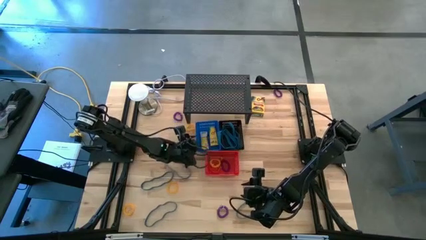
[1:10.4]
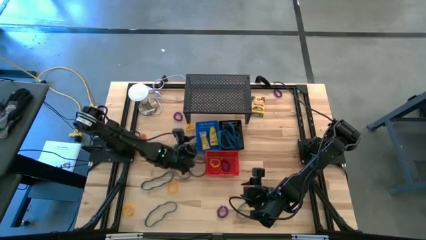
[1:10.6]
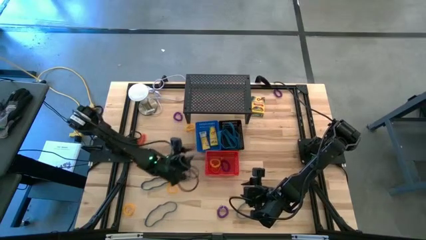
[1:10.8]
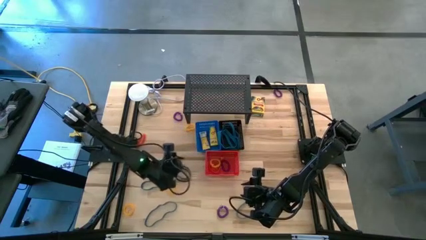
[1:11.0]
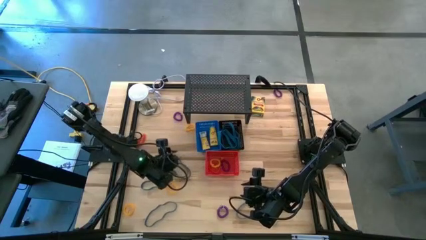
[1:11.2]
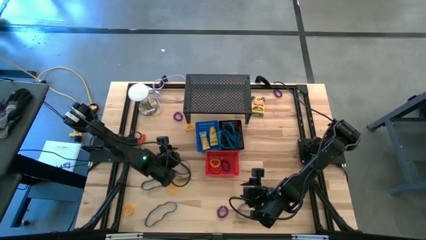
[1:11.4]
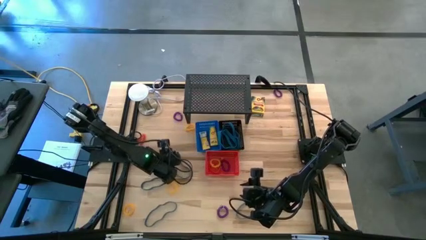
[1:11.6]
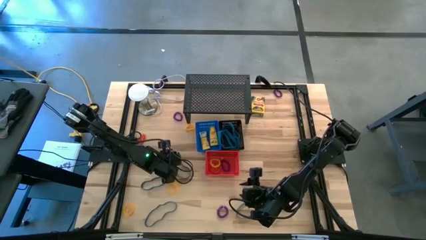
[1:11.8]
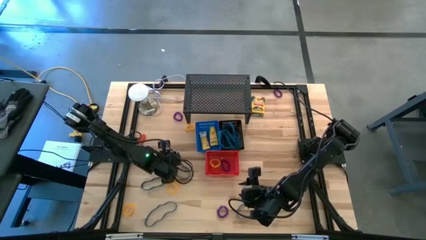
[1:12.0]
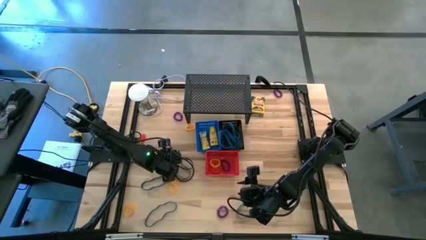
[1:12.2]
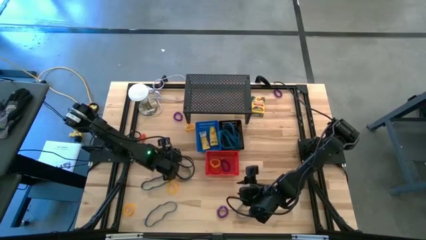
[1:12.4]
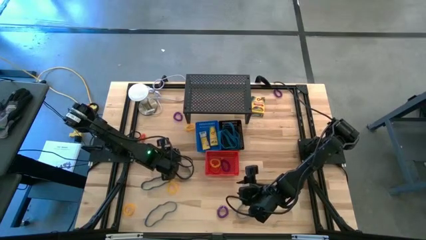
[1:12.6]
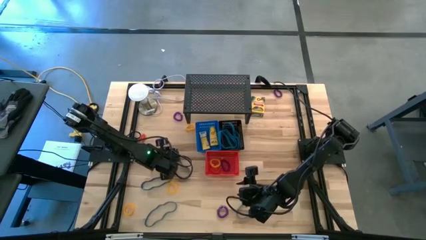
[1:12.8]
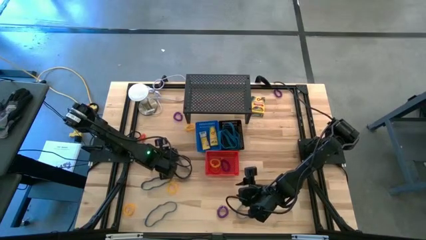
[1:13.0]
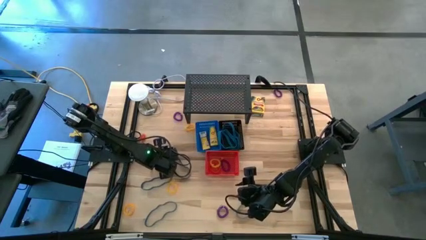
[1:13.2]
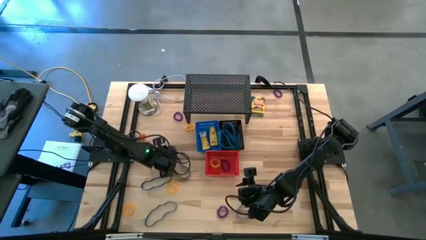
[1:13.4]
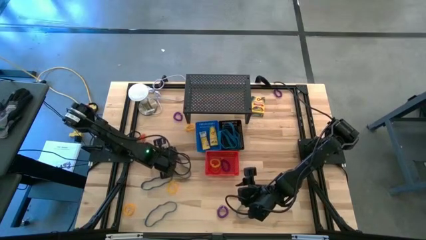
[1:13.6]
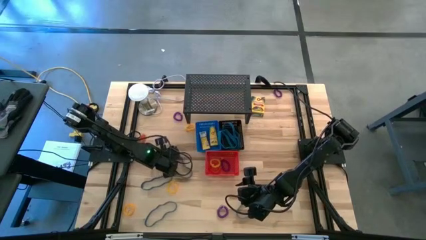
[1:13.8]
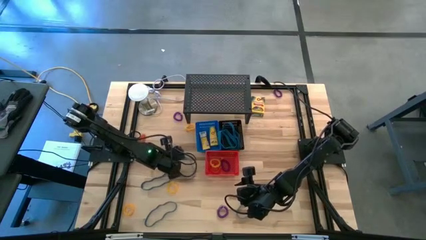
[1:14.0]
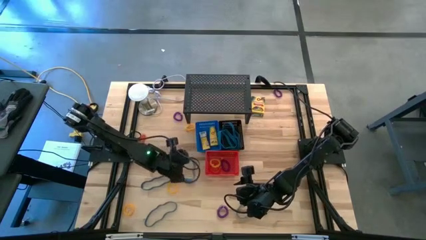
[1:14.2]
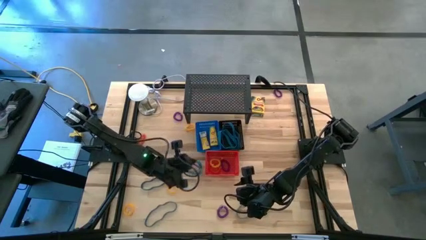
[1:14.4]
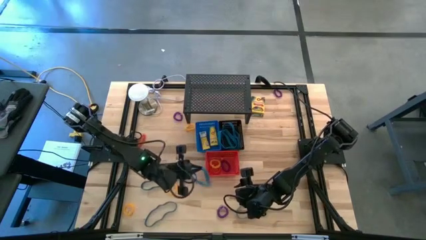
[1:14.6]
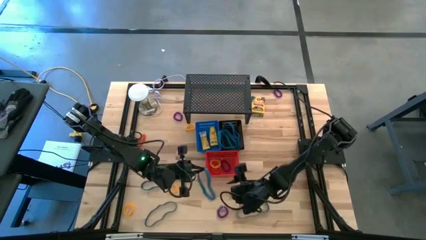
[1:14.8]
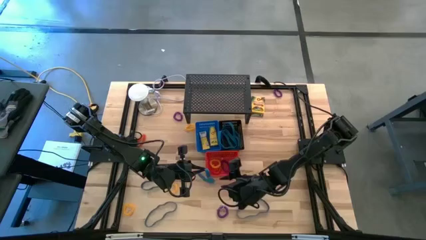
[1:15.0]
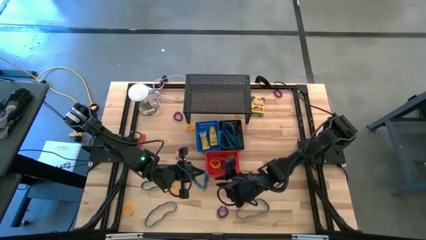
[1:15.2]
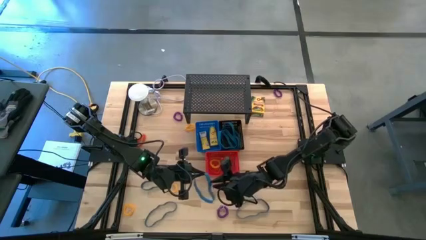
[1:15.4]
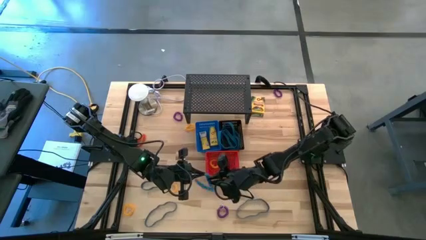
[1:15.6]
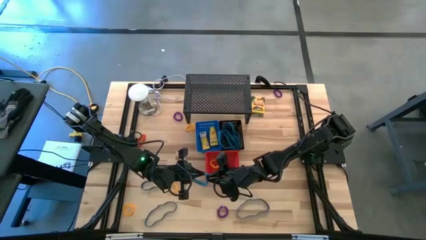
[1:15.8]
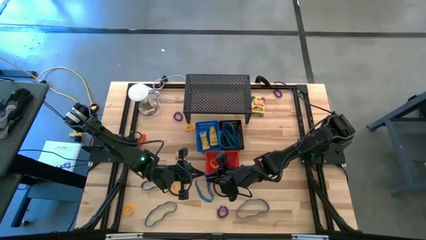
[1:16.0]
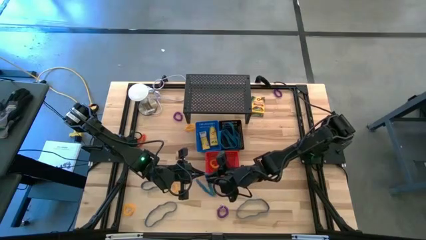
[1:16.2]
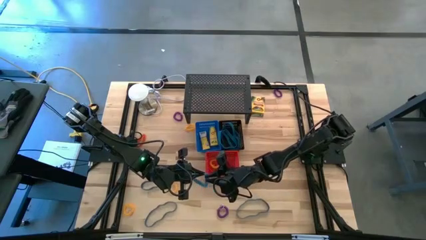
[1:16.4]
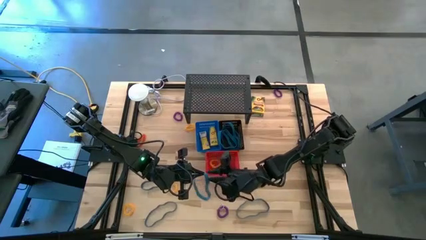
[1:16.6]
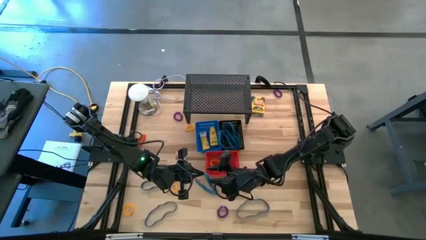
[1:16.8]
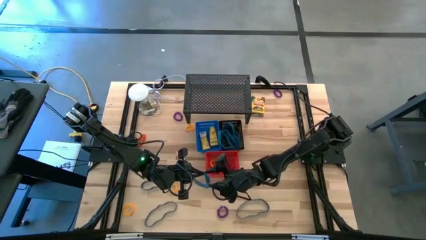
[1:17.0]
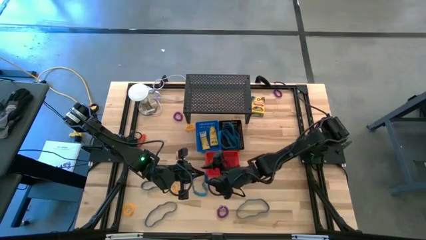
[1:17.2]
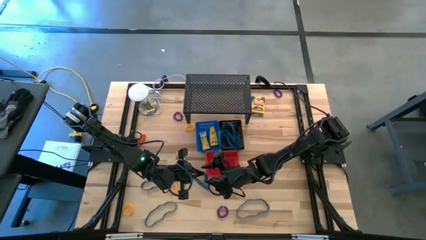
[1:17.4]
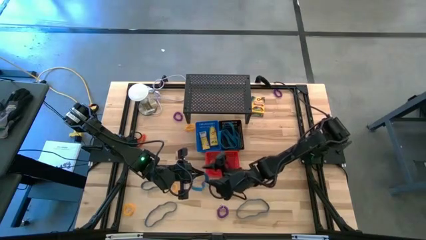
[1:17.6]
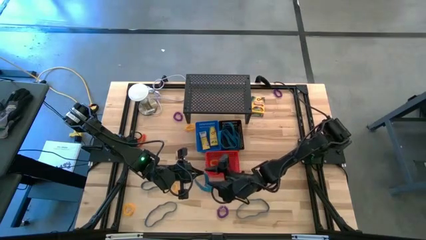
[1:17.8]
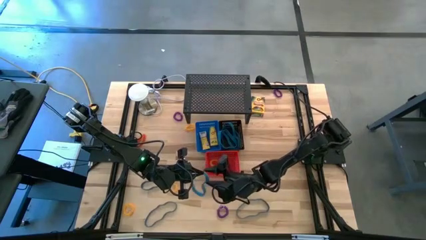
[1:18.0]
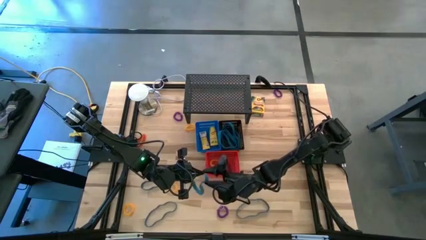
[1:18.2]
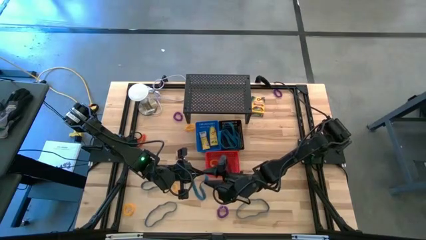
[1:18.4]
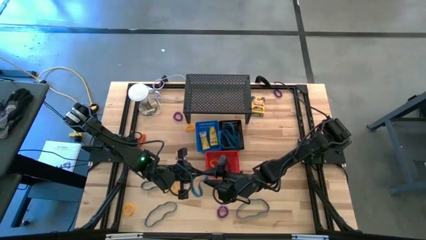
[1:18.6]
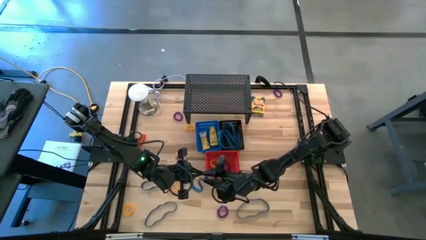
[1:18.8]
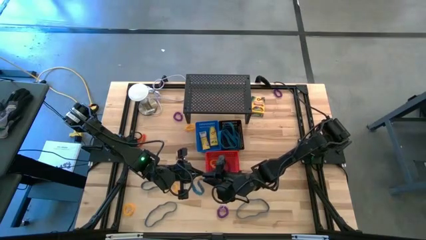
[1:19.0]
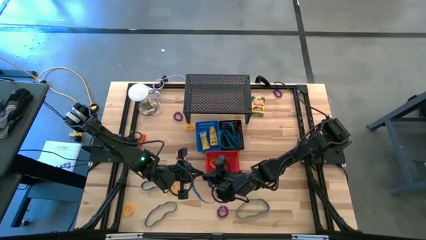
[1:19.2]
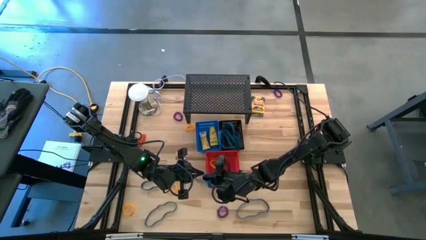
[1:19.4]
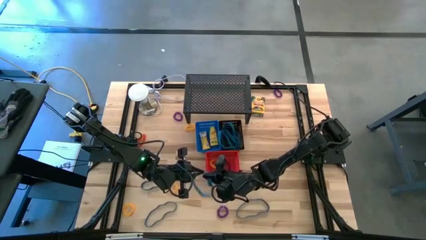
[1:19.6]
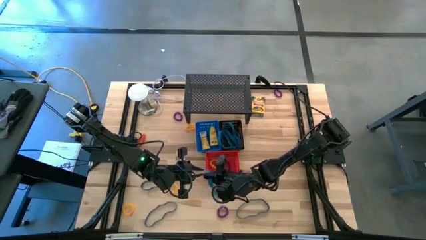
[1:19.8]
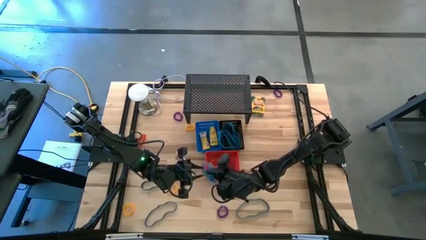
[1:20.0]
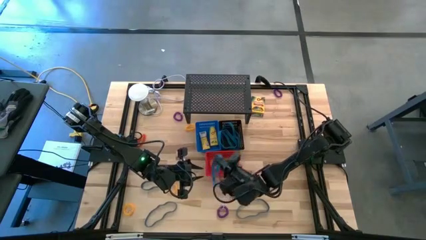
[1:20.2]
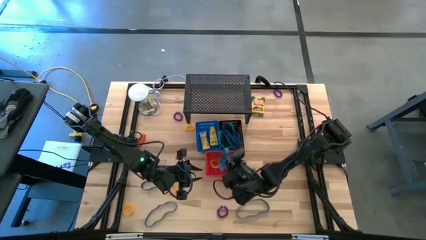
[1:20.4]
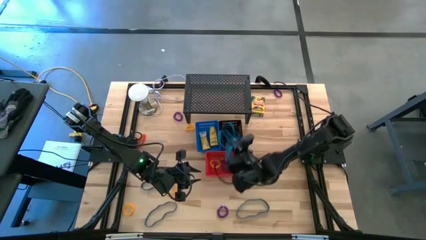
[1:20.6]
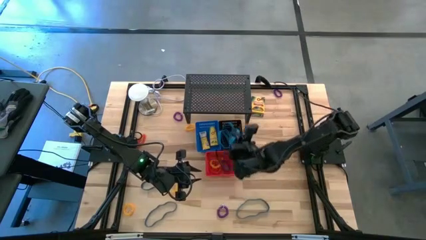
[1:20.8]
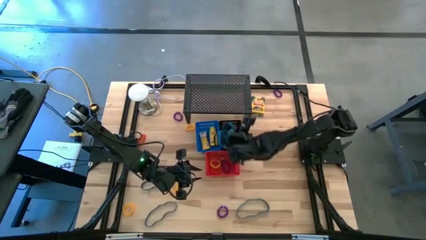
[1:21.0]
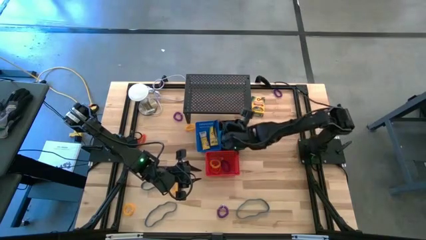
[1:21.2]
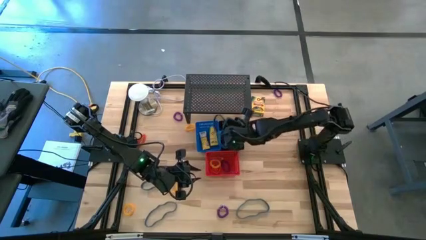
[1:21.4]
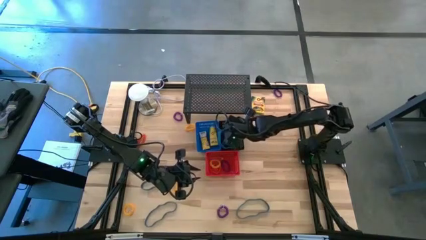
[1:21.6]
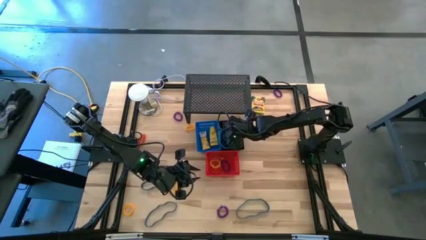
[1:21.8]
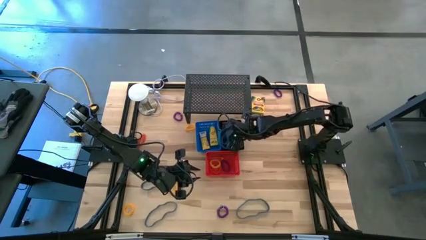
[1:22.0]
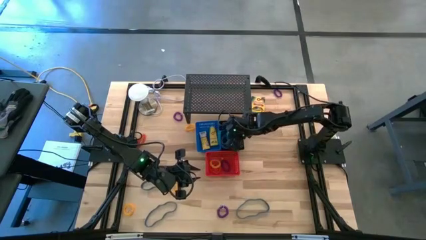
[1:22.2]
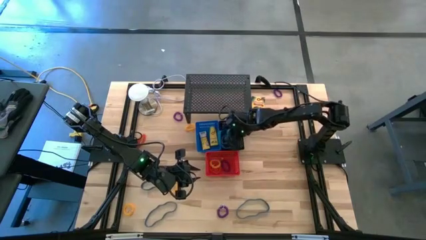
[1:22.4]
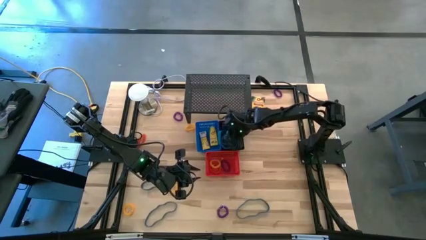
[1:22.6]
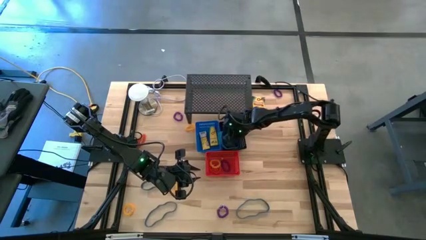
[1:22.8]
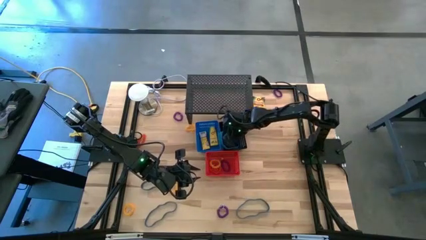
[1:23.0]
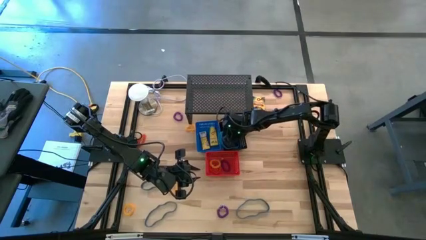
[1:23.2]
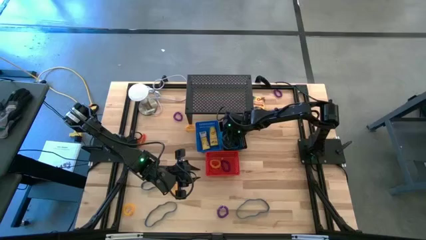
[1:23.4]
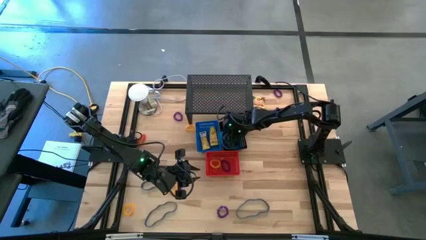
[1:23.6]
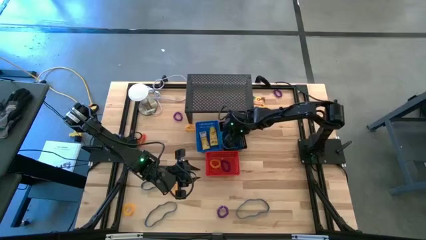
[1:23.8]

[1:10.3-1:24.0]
Task: Pick & Place Office Desk Supplies
Put the blue rubber band into the black bin
